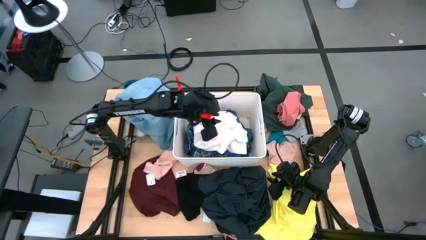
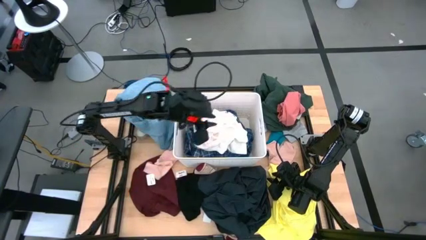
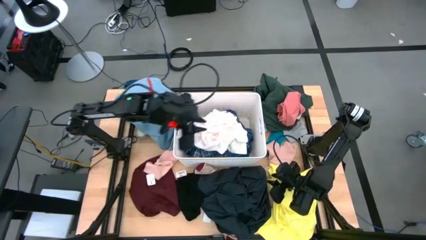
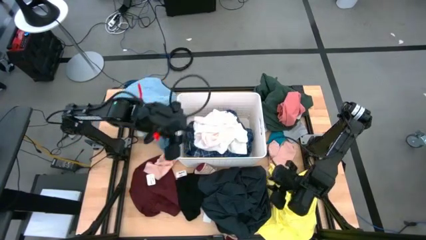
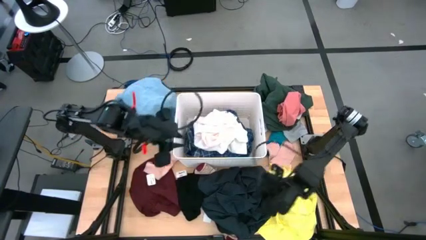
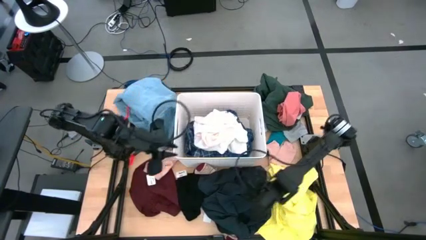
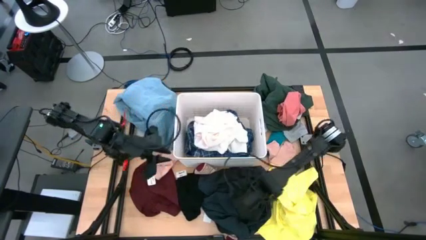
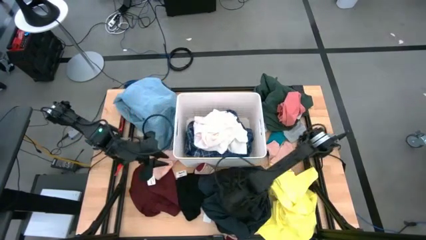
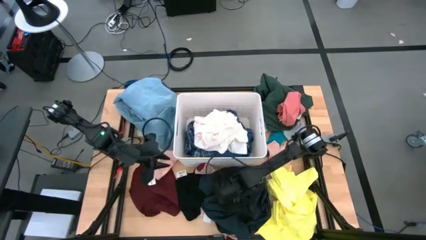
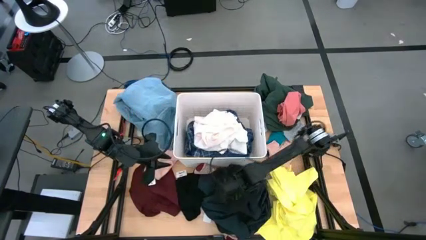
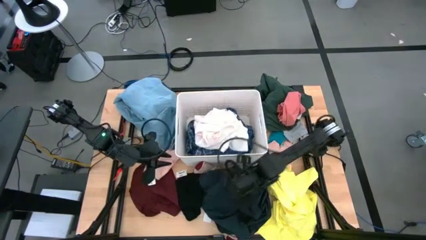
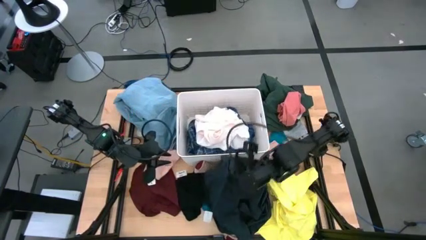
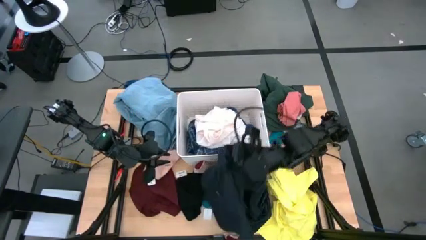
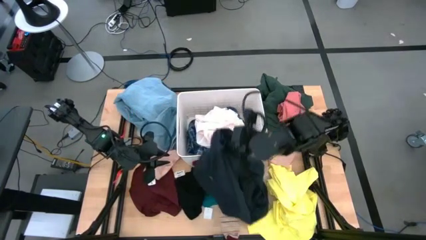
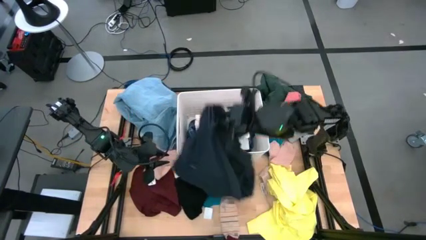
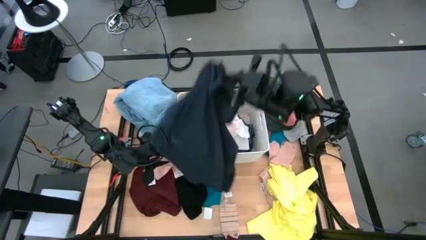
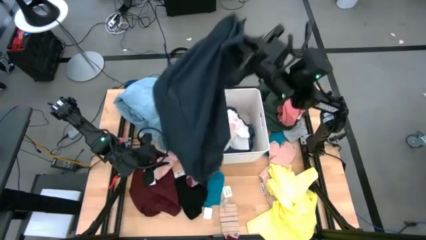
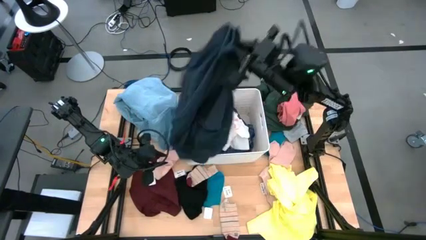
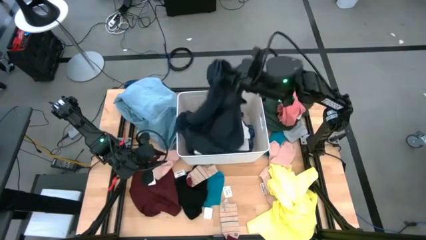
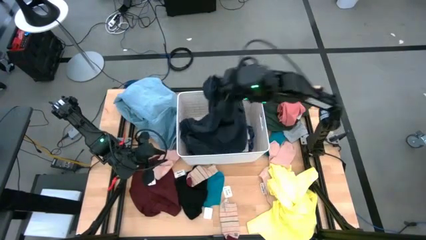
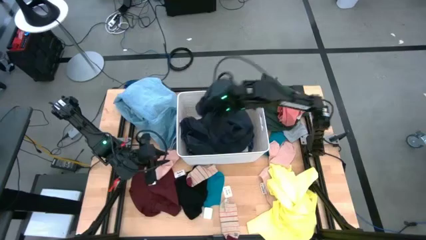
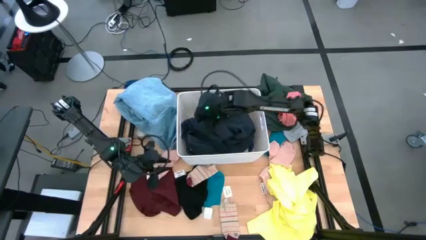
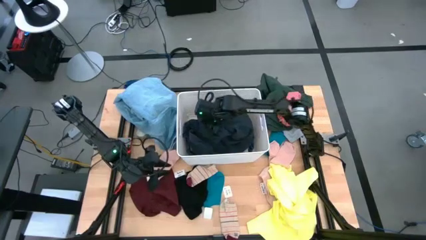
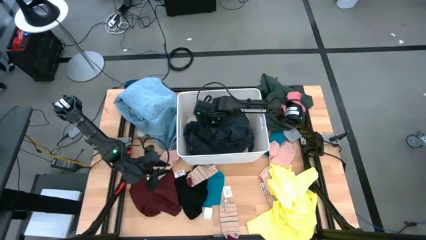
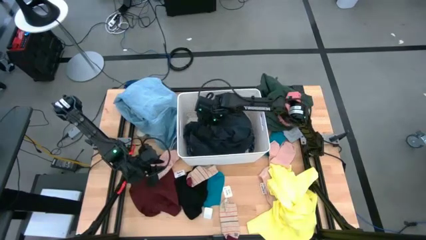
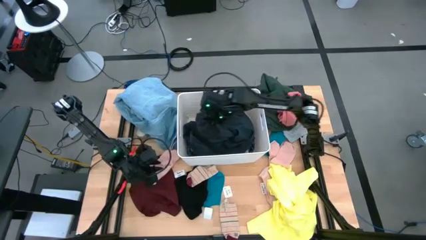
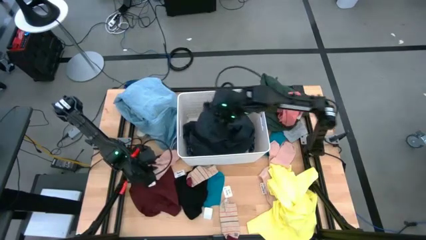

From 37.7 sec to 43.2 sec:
Task: Sort clothes
Put the black pants into the laundry bin

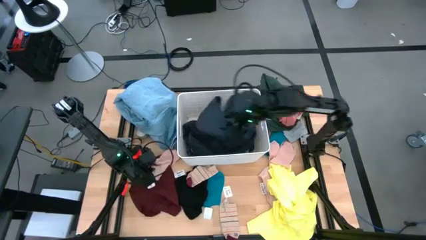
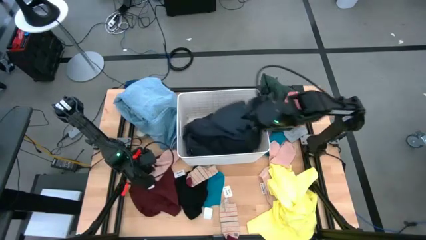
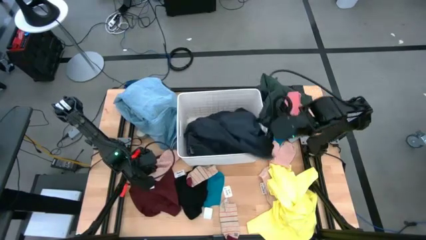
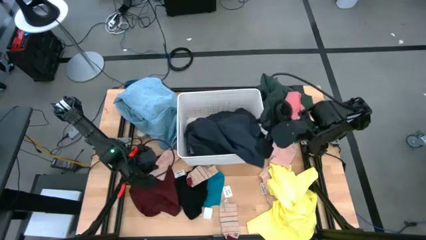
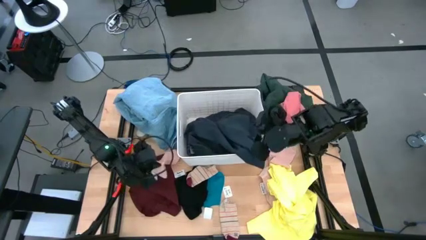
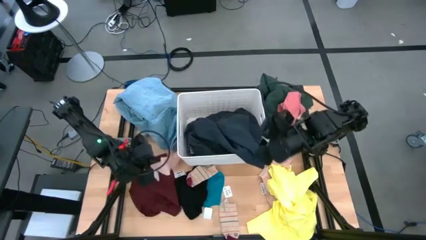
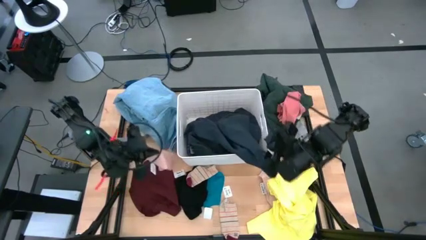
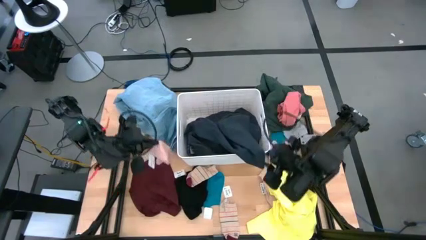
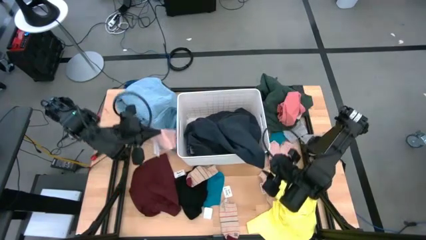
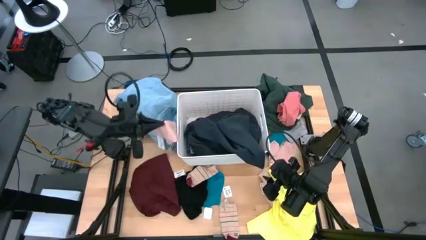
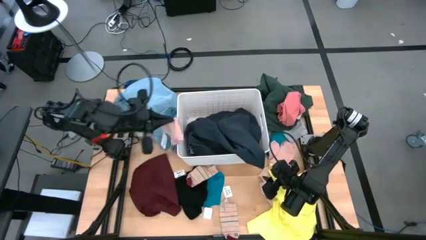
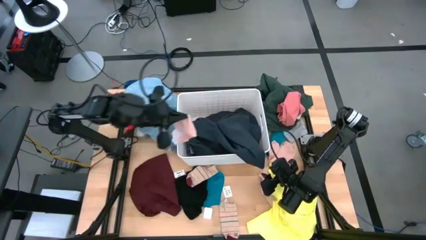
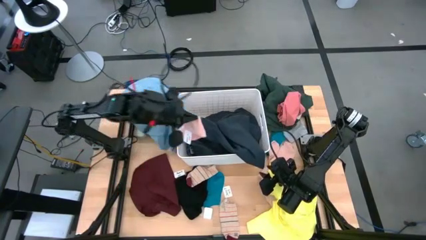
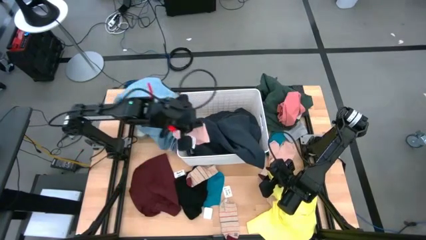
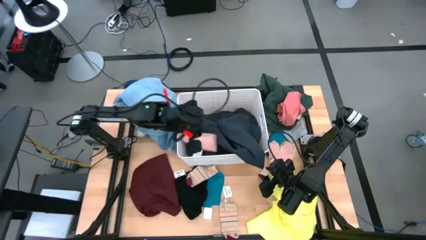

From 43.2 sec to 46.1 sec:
Put the pink sock into the laundry bin

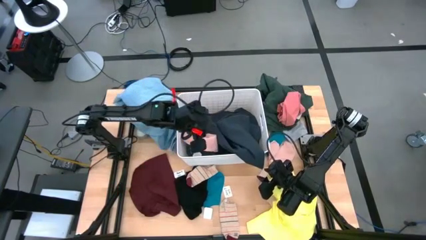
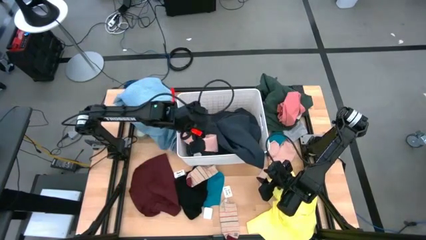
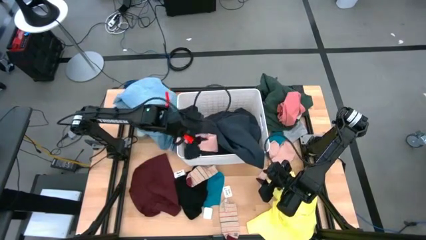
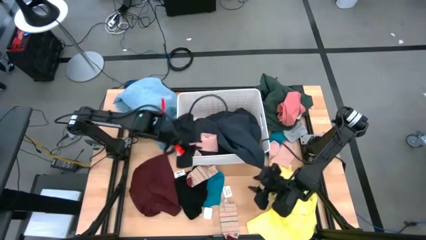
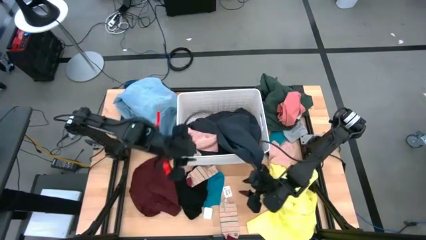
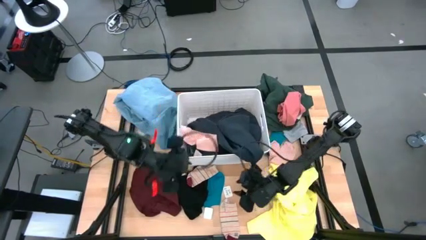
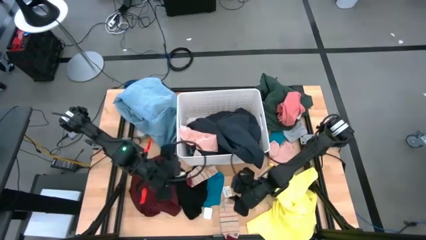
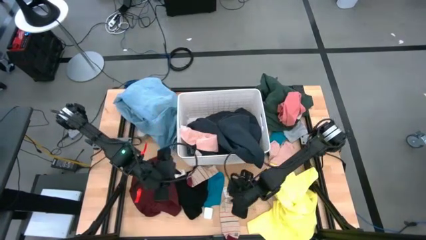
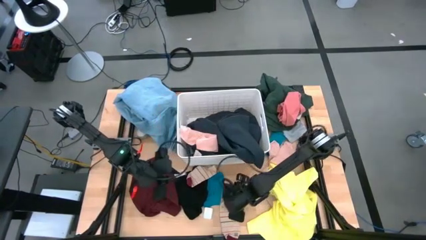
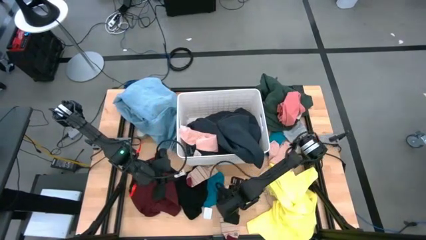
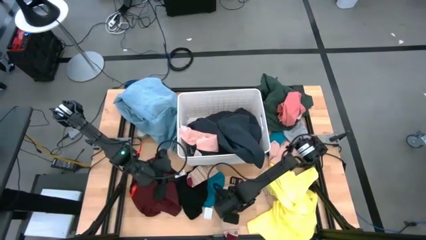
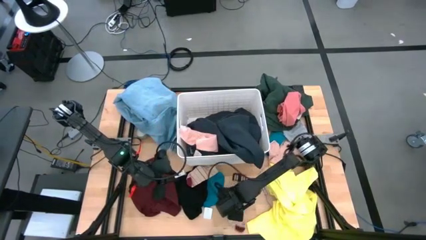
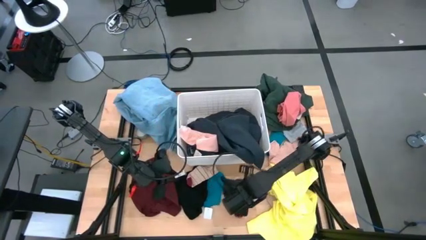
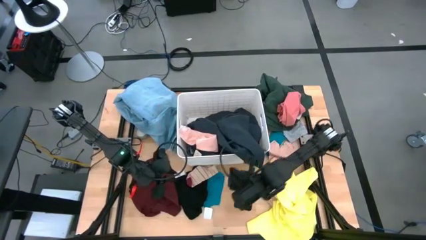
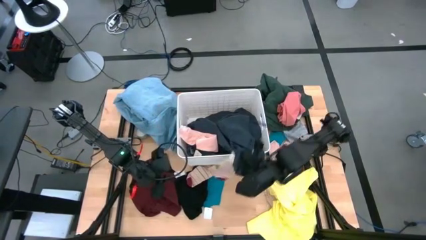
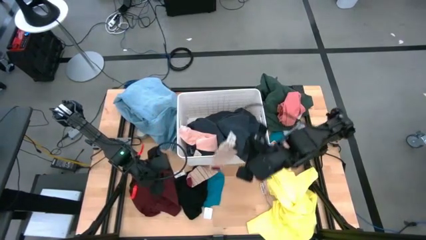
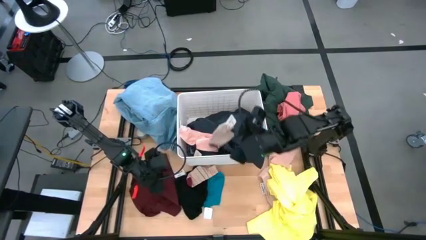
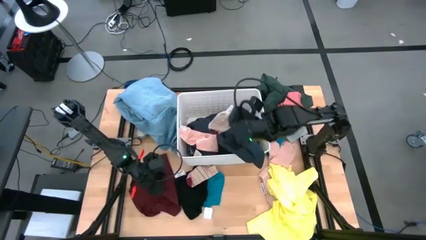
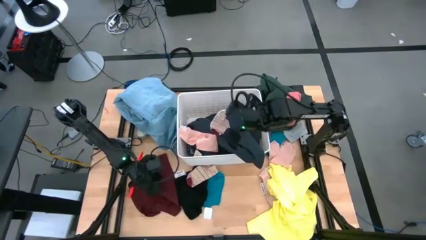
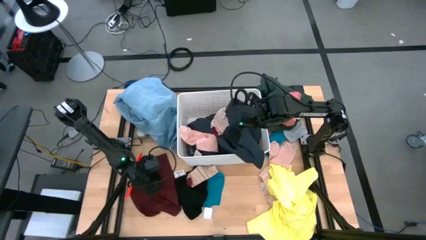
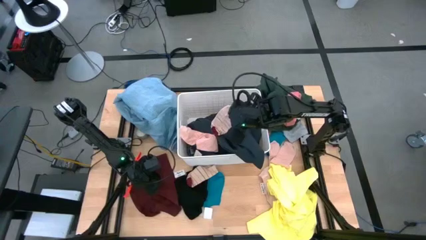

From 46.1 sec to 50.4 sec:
Put the brown patterned sock into the laundry bin

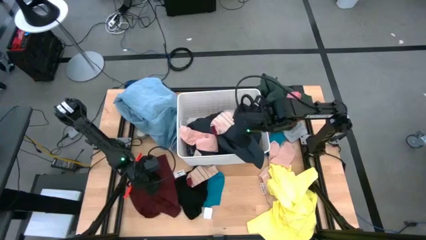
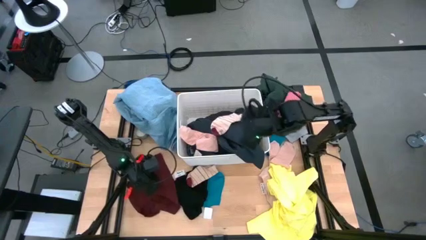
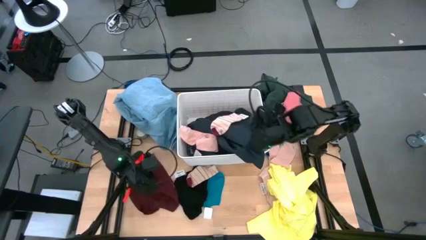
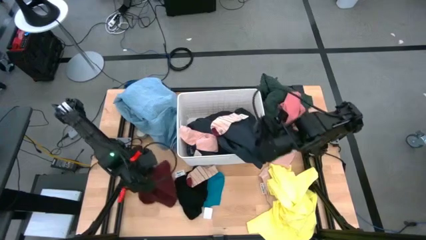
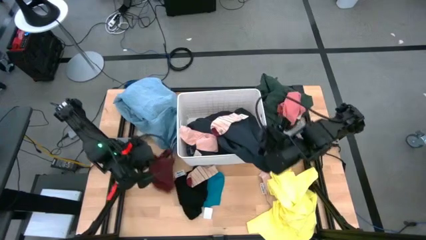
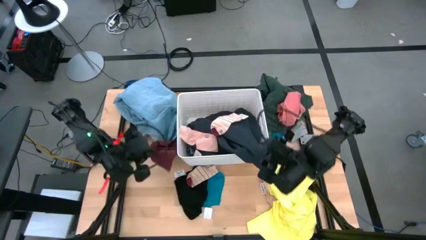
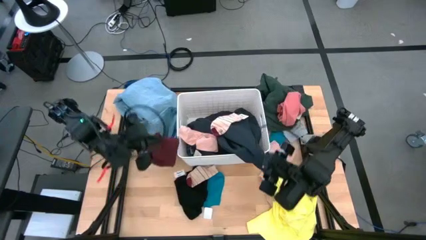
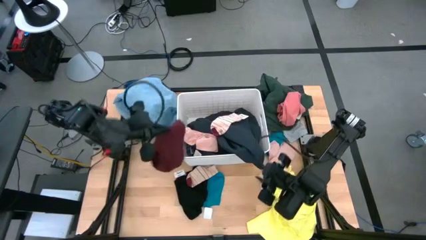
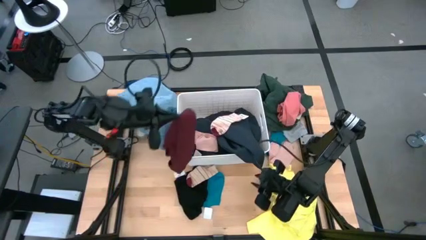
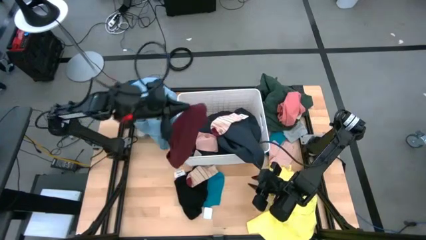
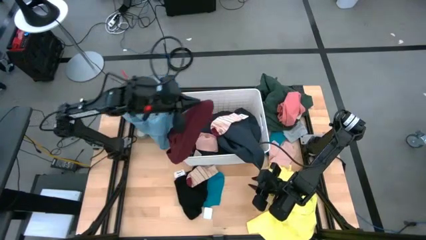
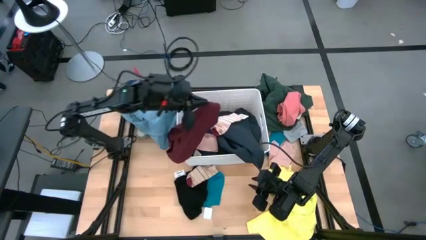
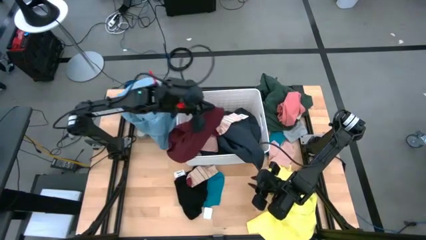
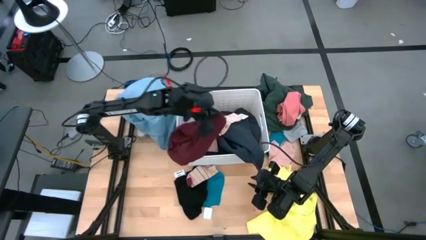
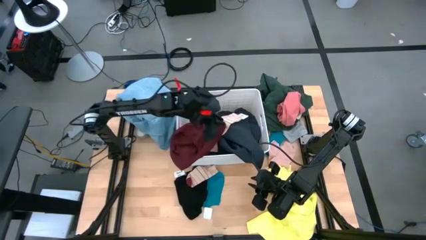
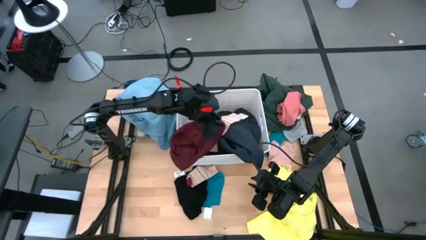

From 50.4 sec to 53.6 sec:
Put the red underwear into the laundry bin
